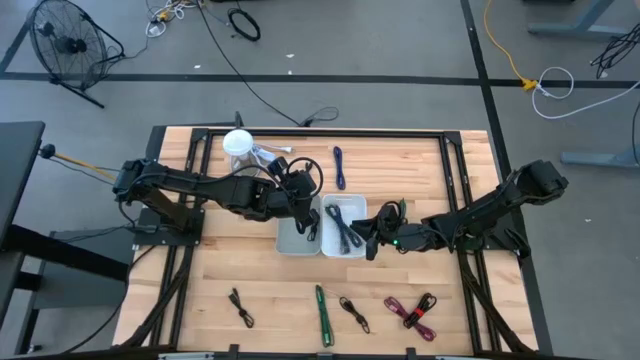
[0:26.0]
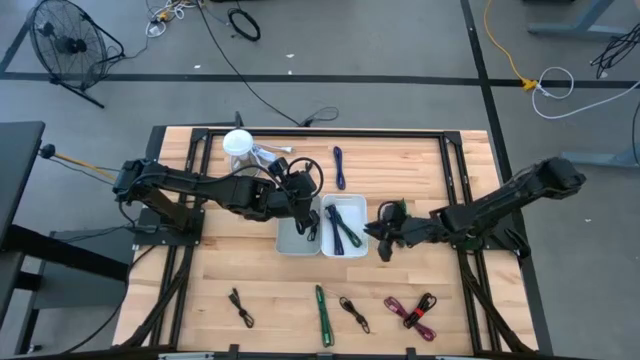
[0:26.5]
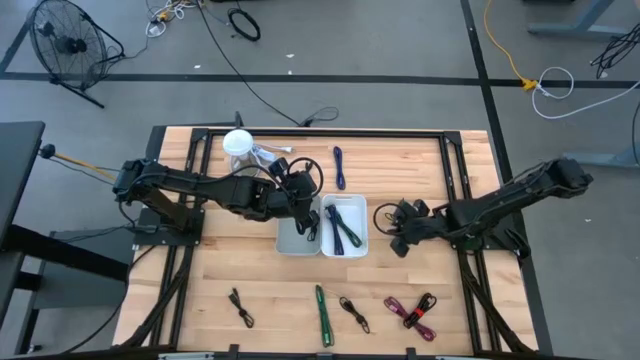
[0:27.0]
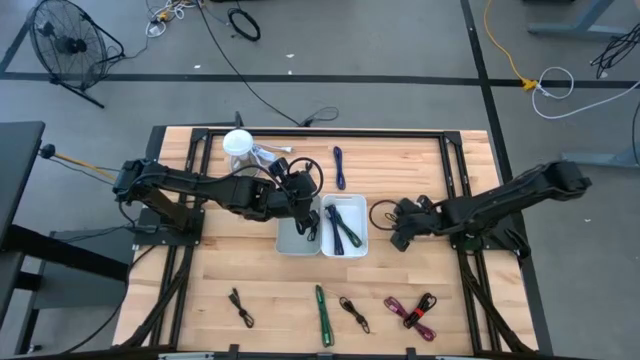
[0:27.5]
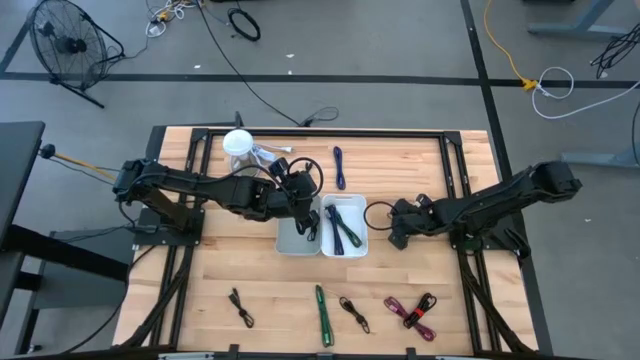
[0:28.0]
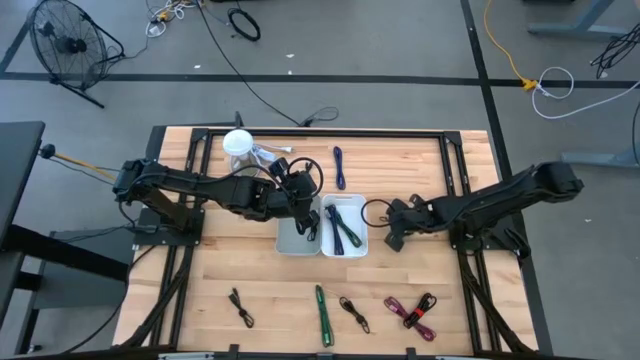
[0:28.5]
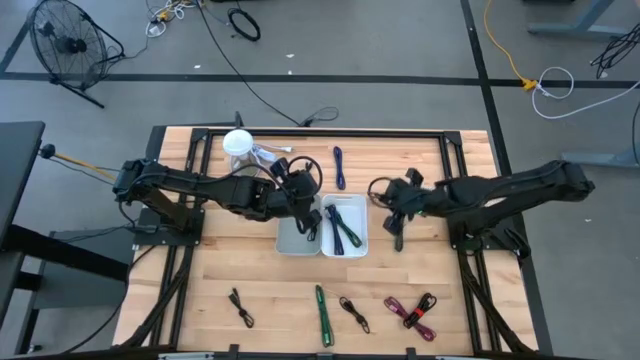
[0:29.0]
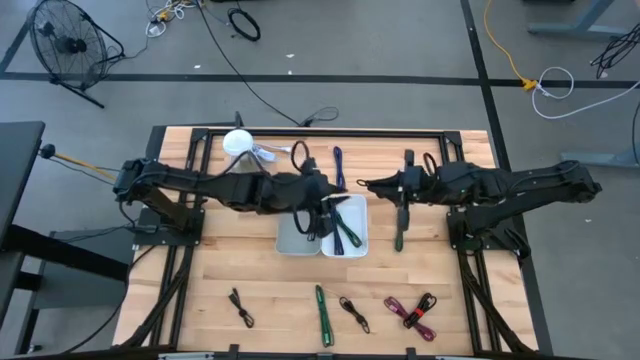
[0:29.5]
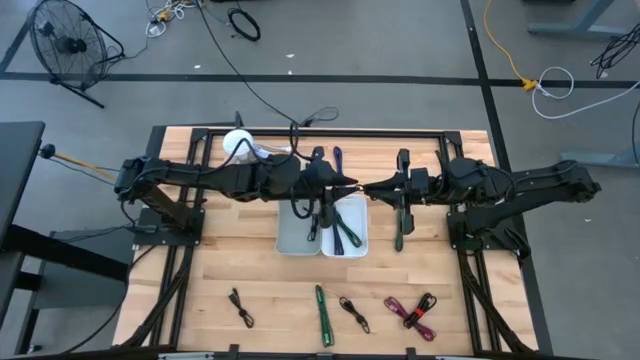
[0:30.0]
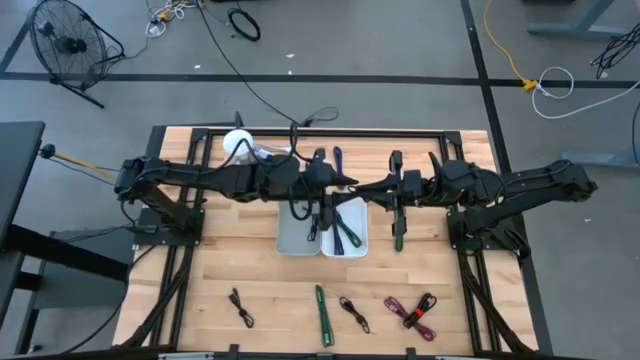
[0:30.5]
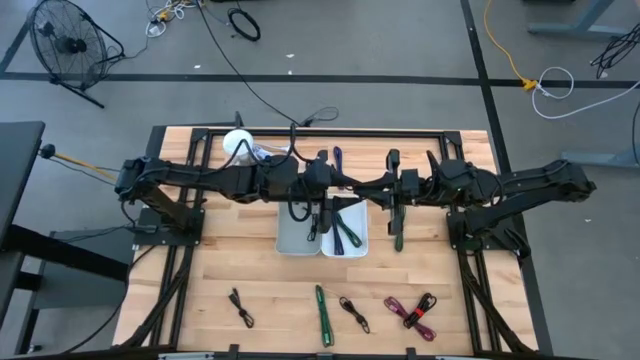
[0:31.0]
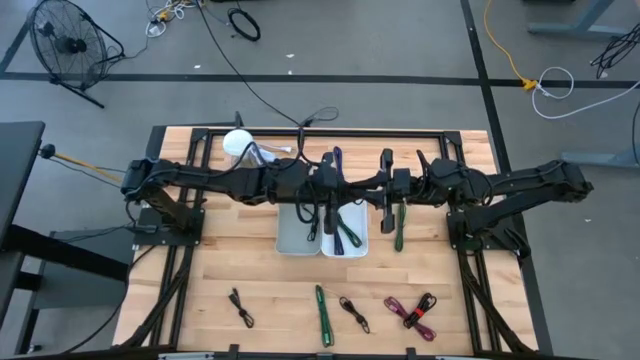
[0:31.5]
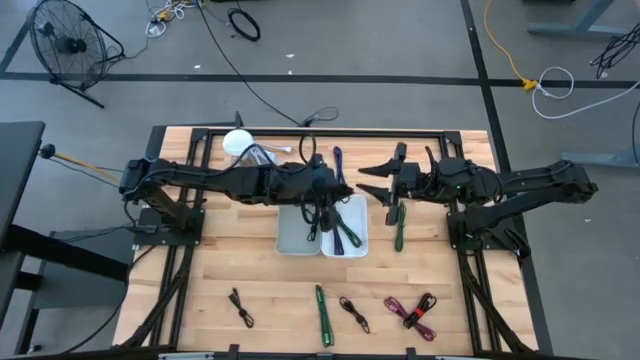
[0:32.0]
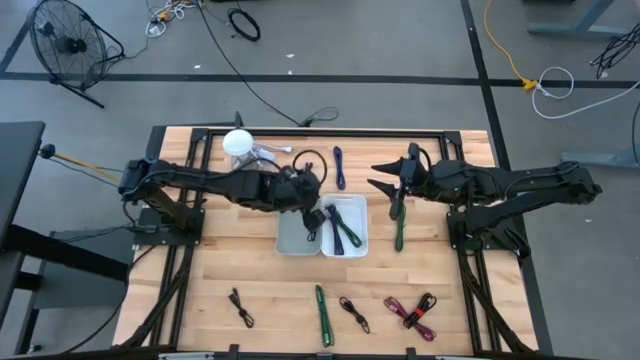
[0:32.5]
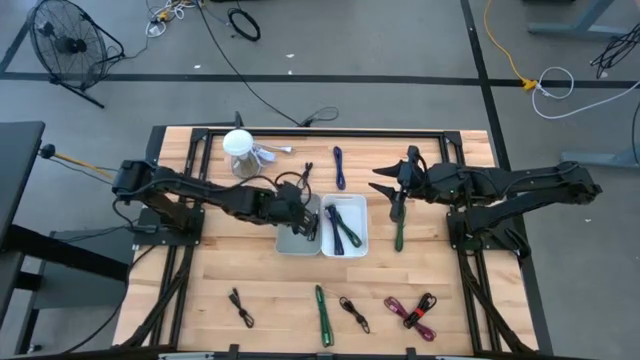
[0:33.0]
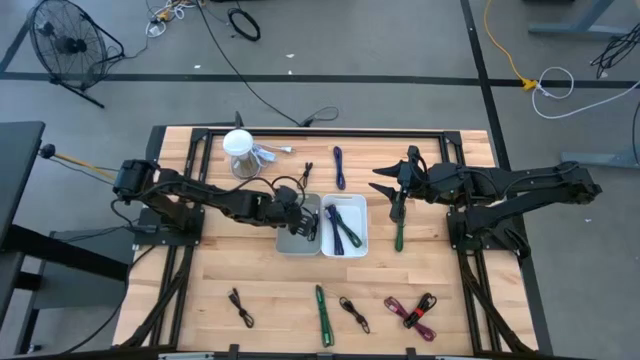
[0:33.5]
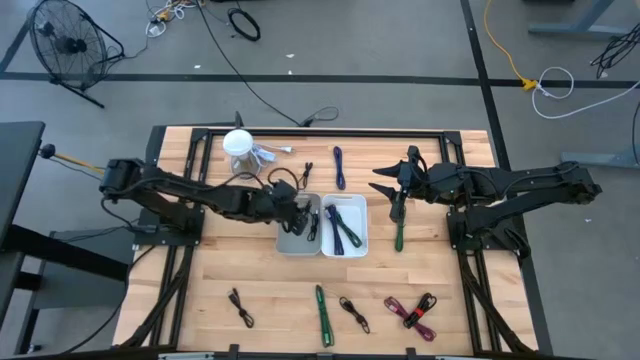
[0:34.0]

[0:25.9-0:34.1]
Task: Pick & Place USB Port
Put the black charger cable into the gray bin

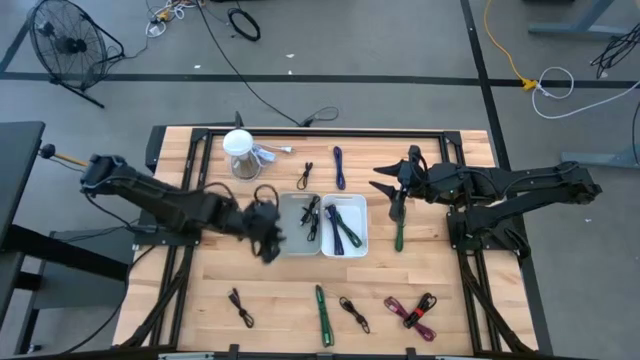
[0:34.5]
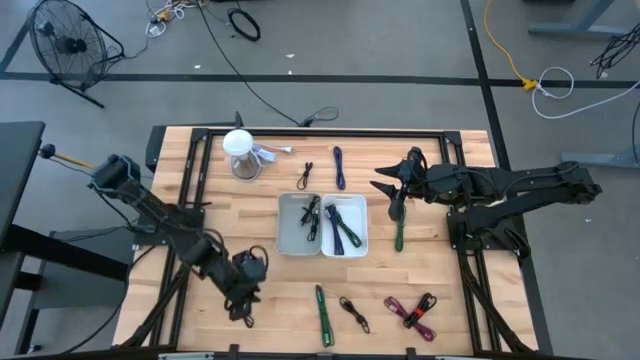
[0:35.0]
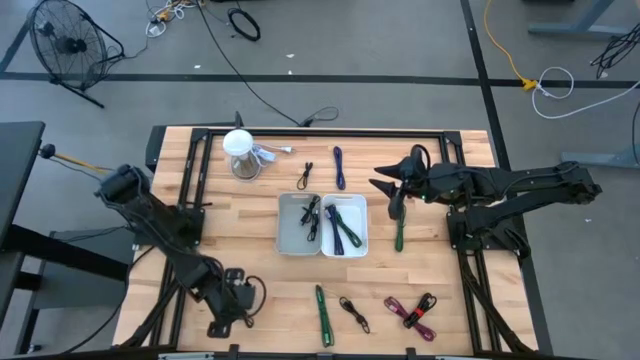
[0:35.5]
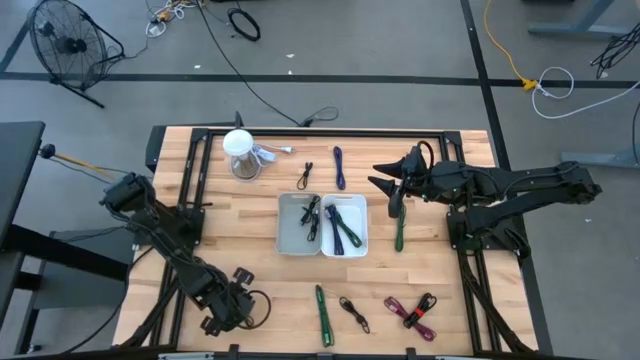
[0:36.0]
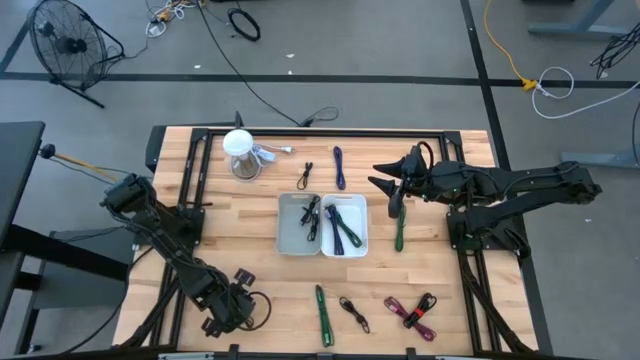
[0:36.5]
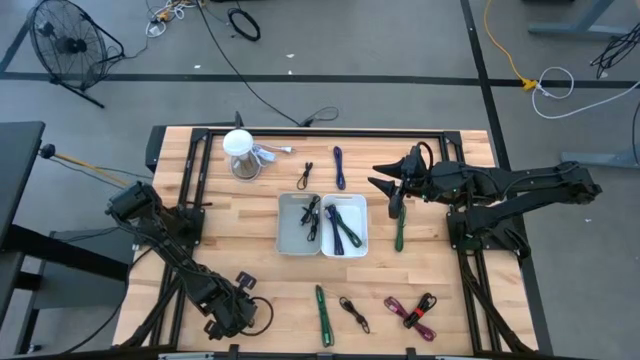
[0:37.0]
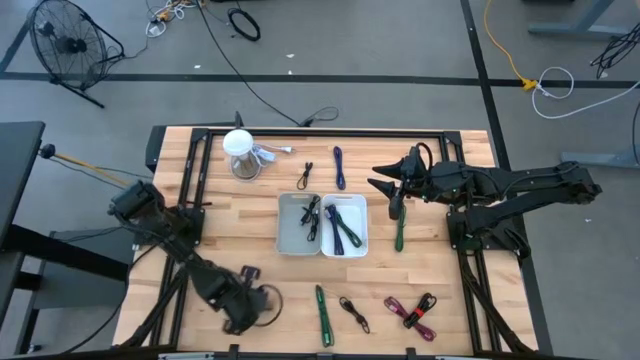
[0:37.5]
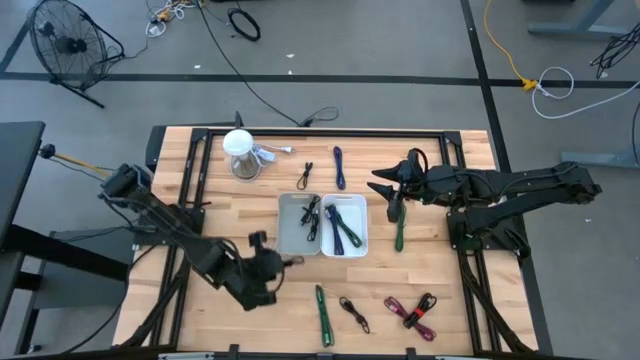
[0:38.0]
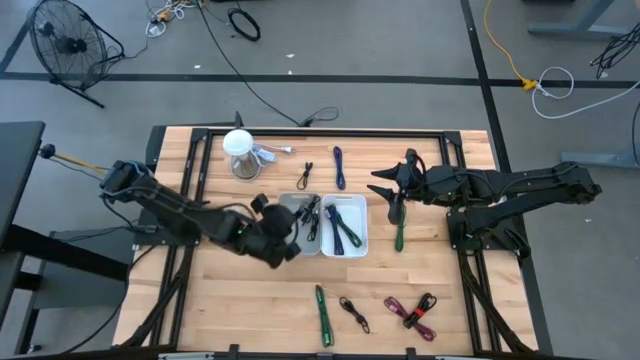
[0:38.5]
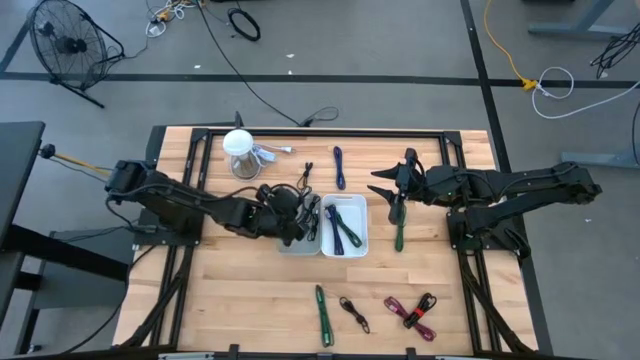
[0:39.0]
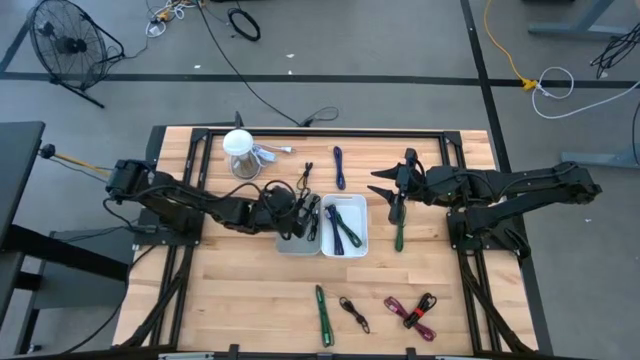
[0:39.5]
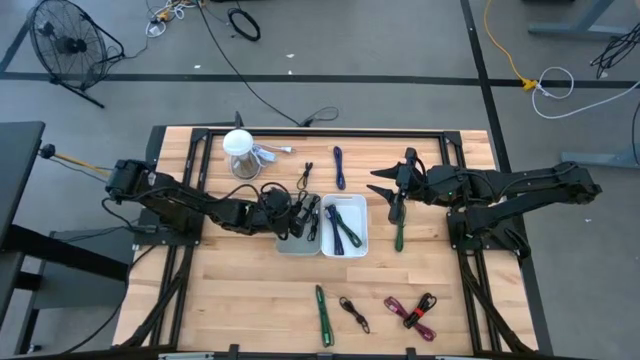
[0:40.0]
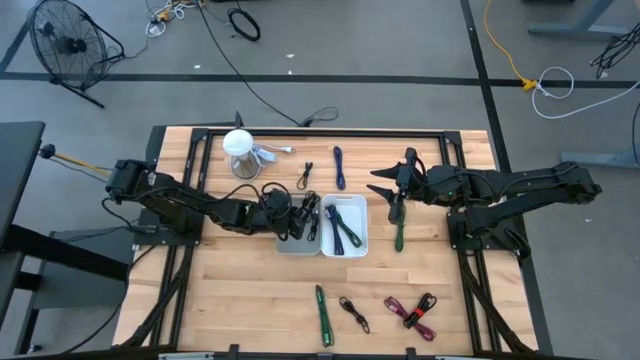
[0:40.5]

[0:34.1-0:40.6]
Put the black charger cable into the gray bin

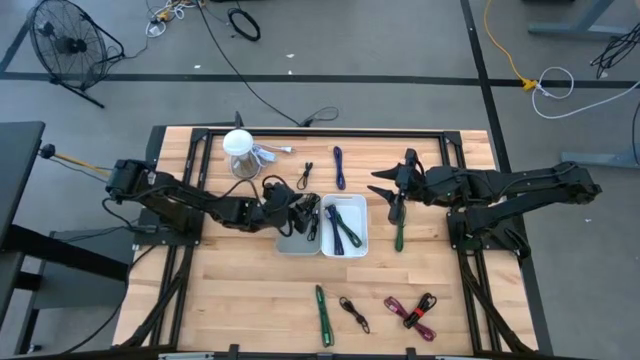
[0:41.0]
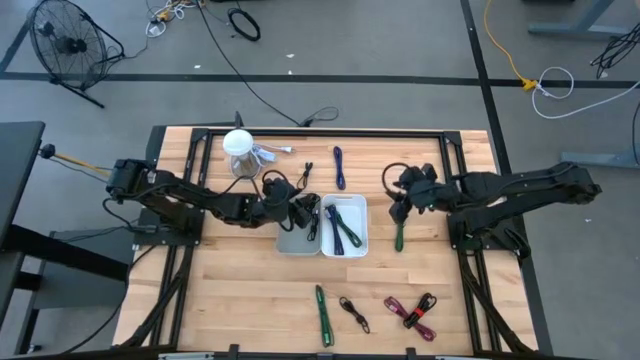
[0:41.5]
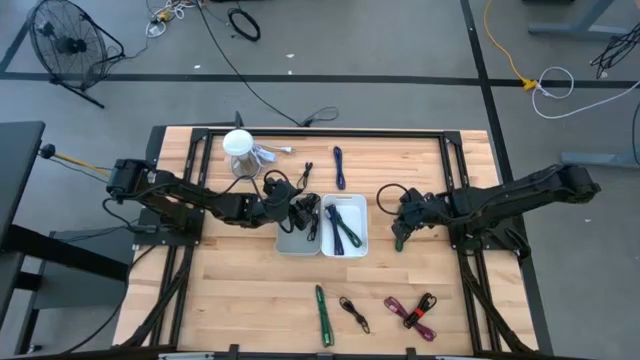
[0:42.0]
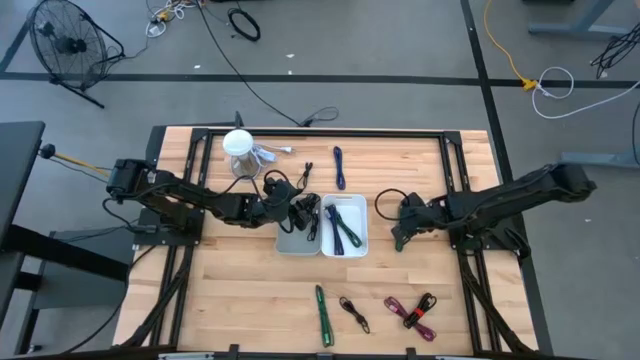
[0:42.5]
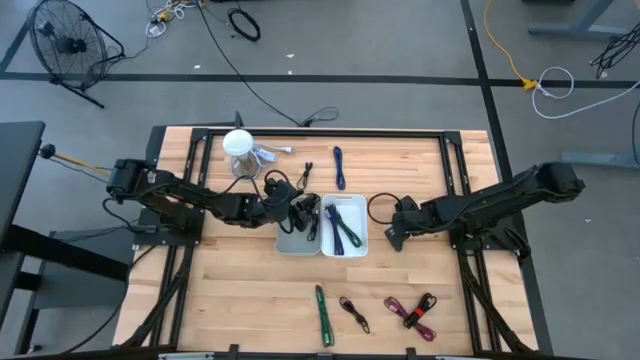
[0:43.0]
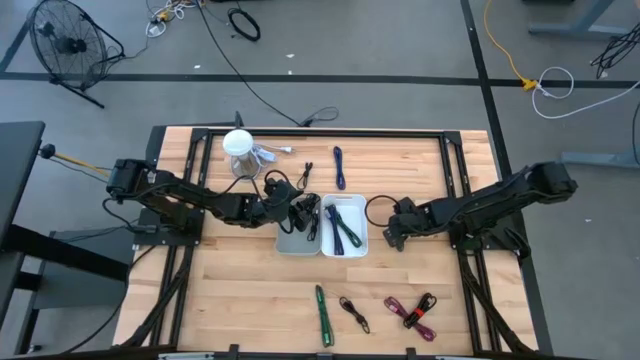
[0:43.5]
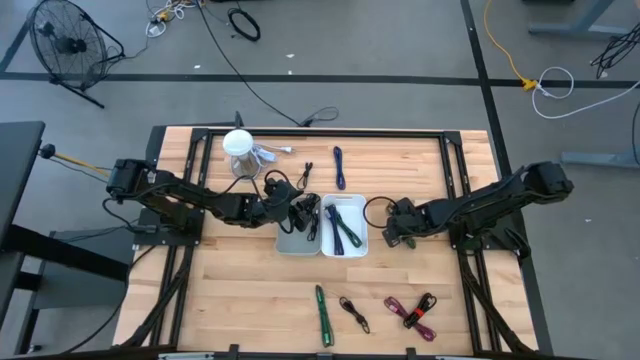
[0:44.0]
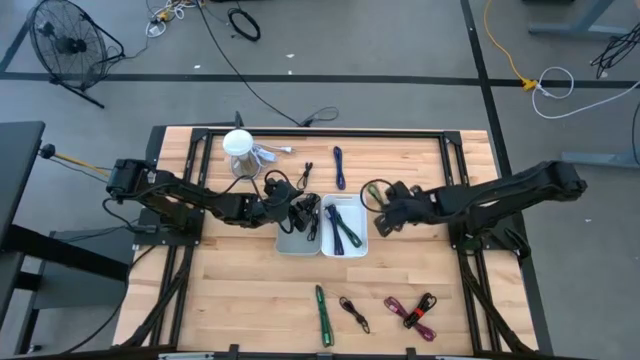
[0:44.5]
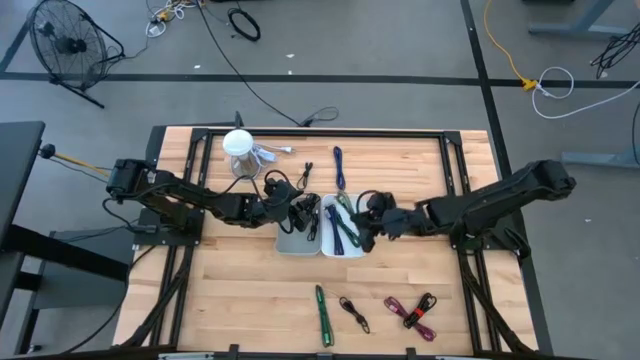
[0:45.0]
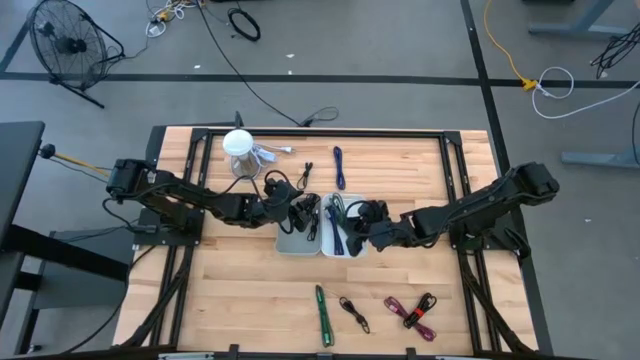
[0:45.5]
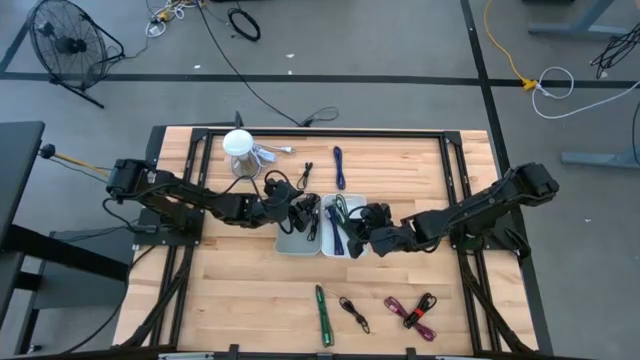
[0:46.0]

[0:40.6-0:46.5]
Put the green charger cable into the white bin

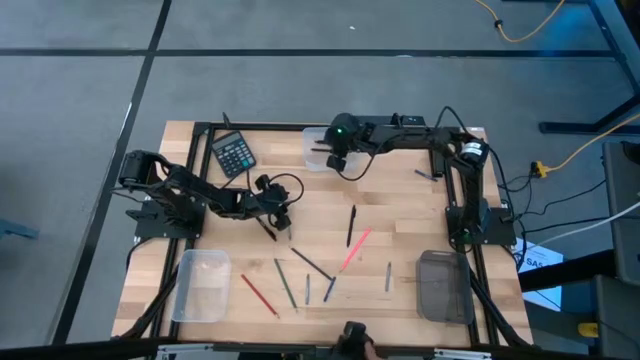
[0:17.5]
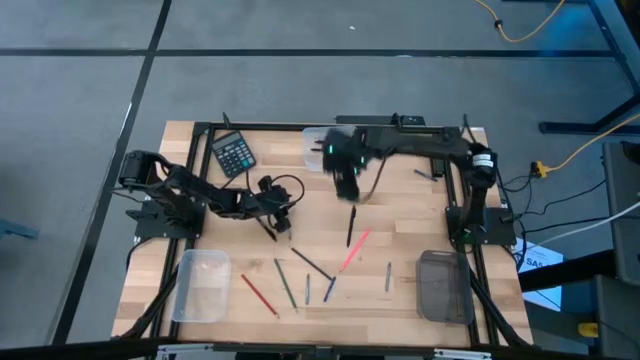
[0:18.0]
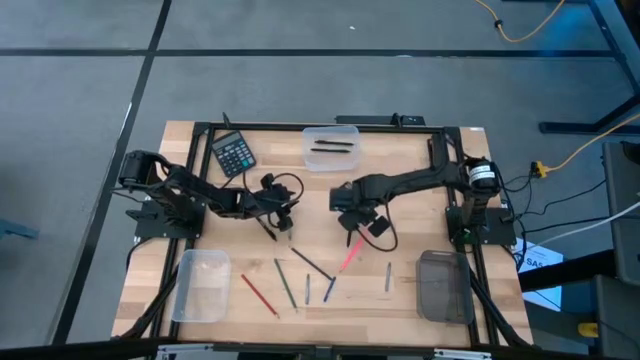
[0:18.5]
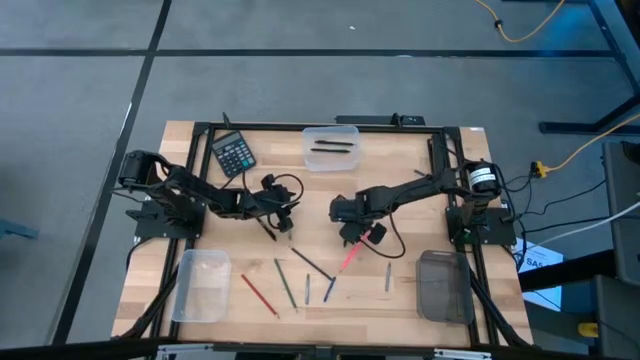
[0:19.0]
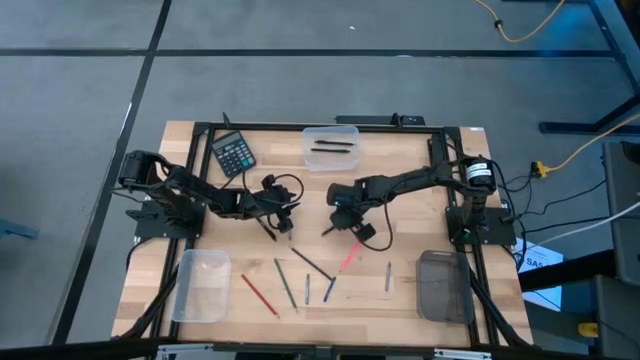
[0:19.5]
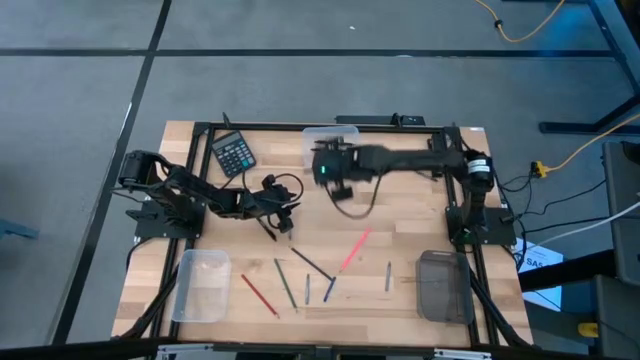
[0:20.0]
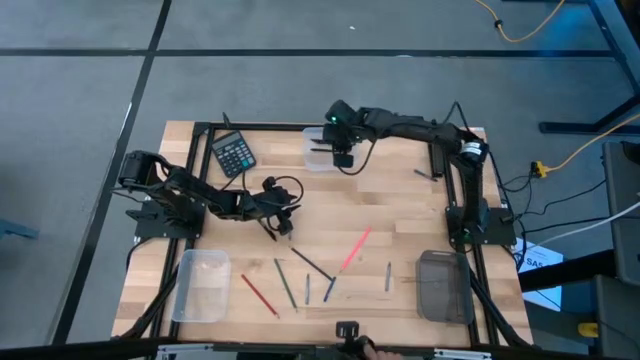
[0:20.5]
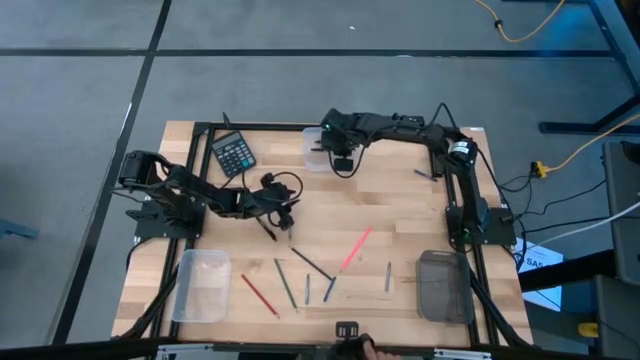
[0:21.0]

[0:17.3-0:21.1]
Task: Sort crayons/erasers/pens/pencils in bins
Put the right black pen into the top transparent bin
